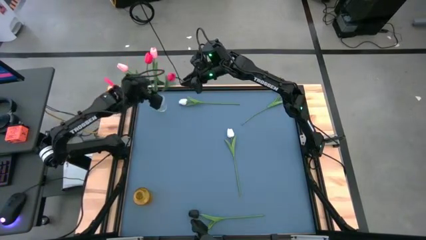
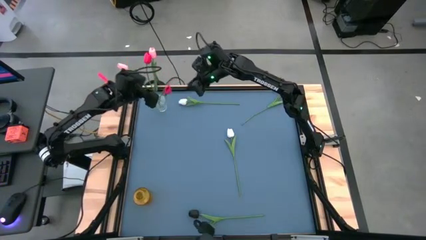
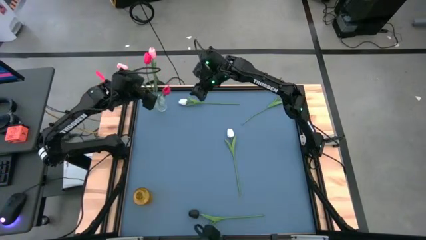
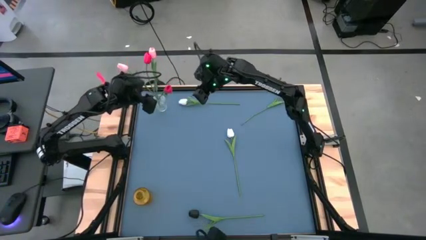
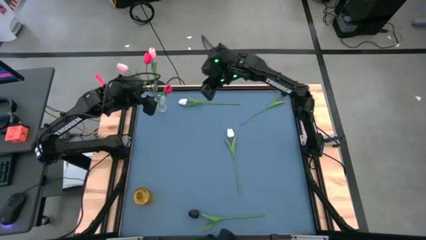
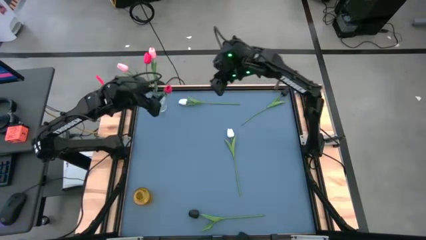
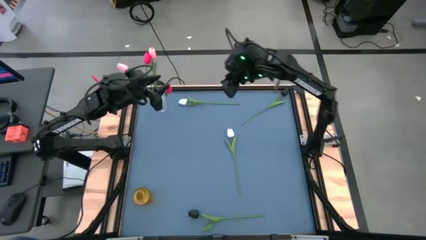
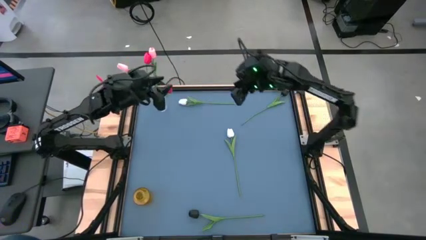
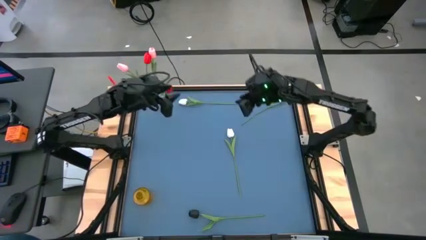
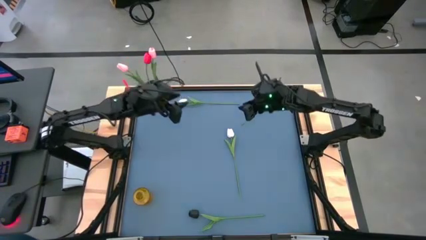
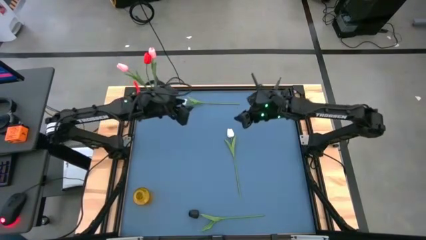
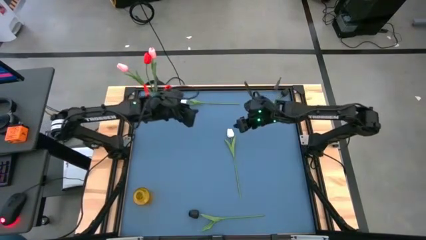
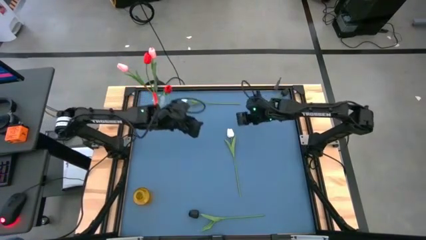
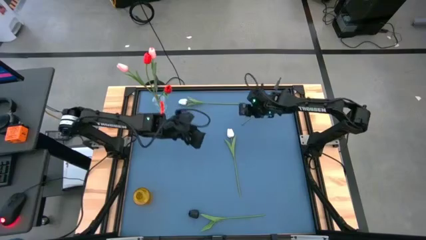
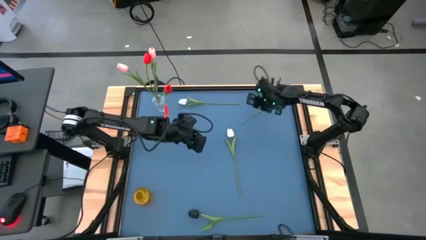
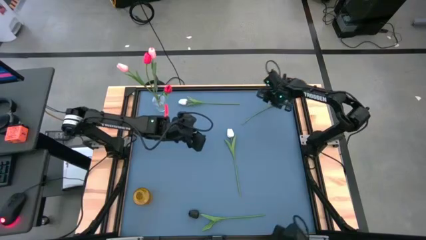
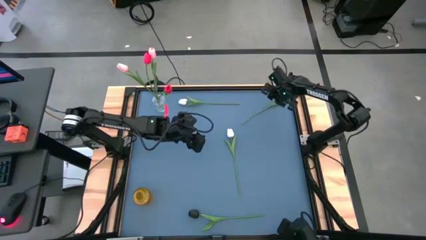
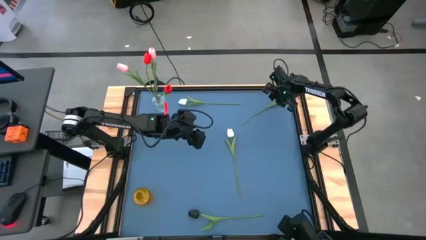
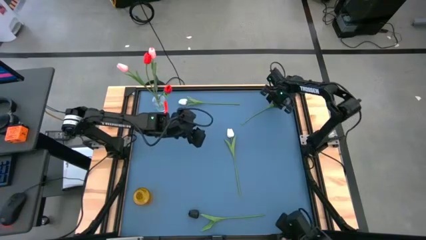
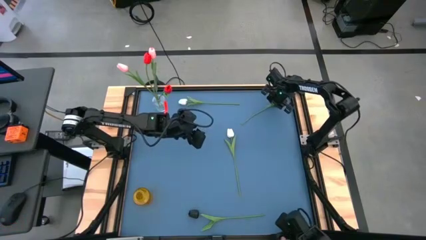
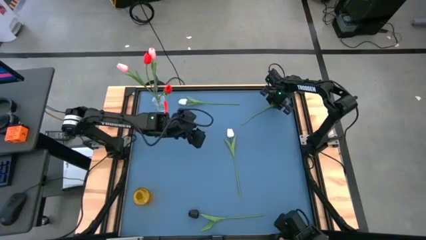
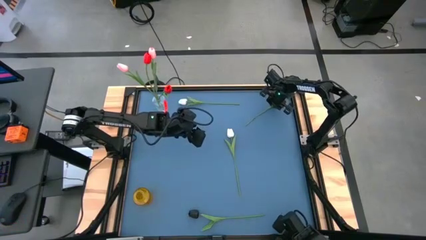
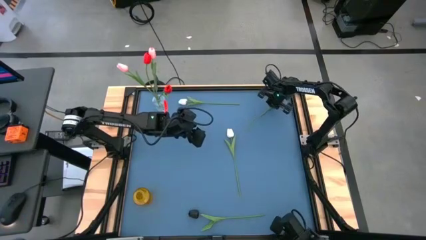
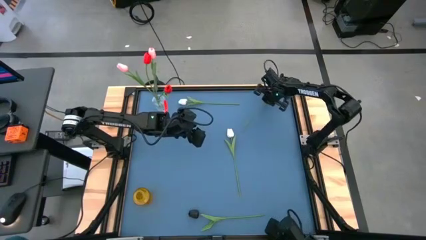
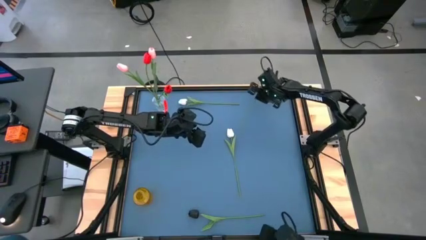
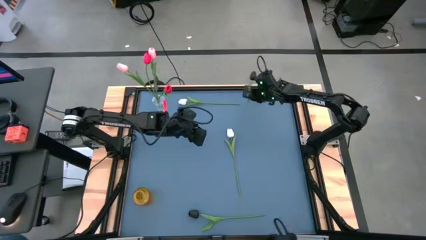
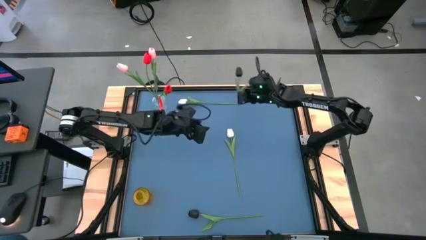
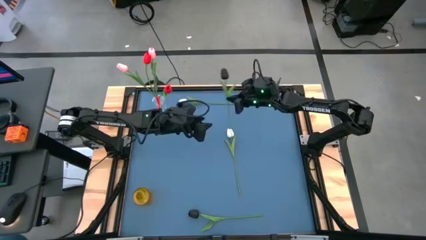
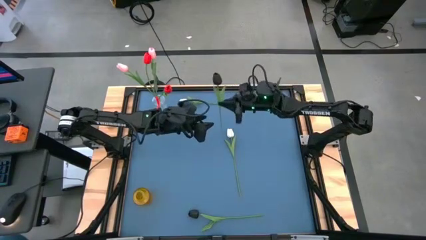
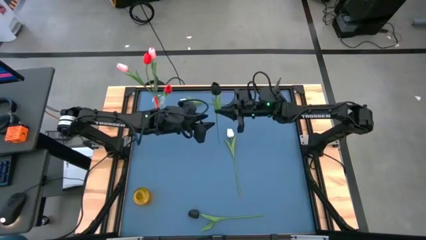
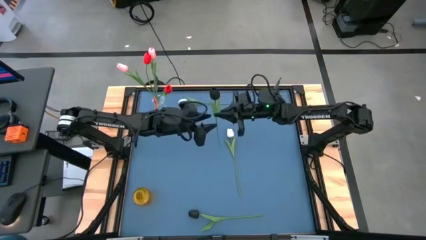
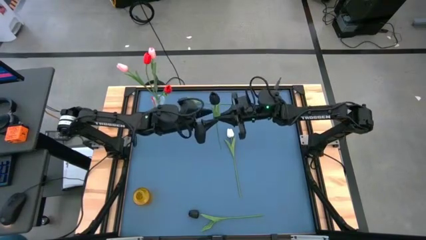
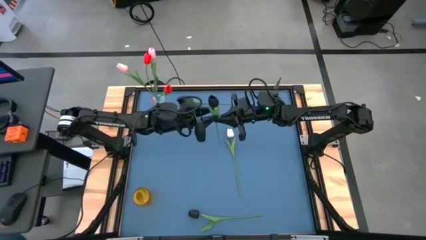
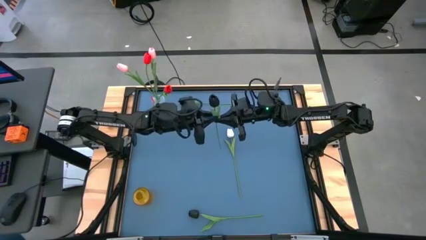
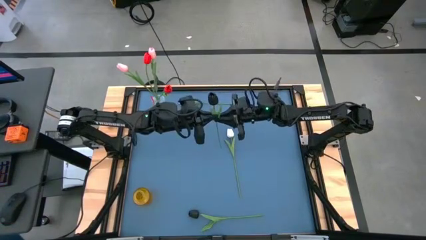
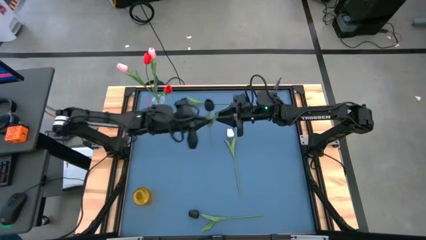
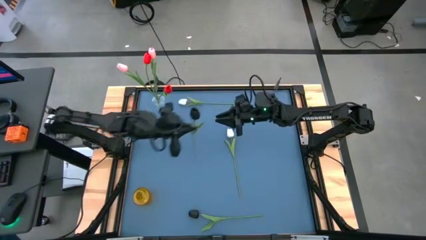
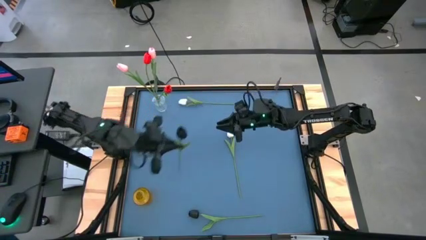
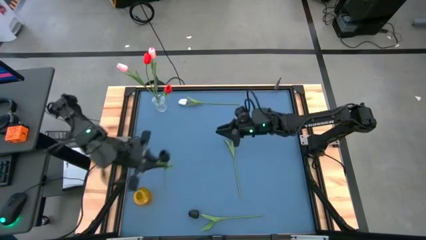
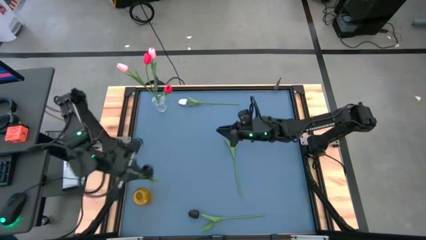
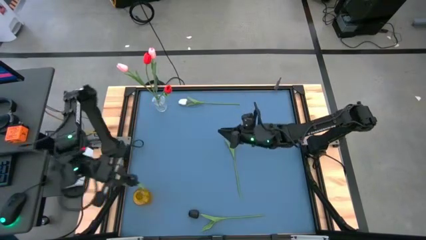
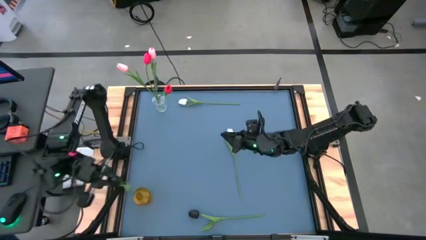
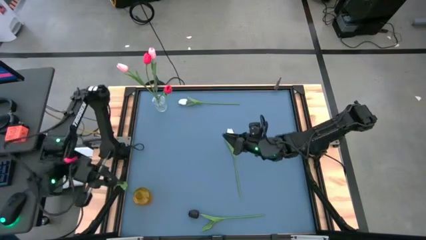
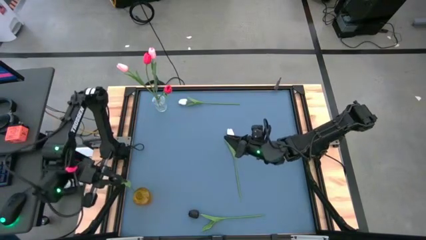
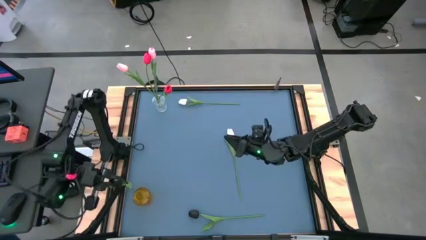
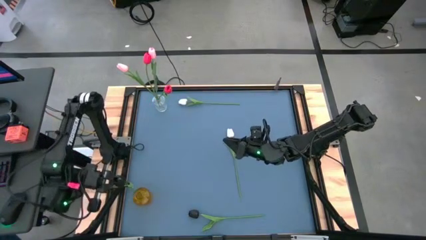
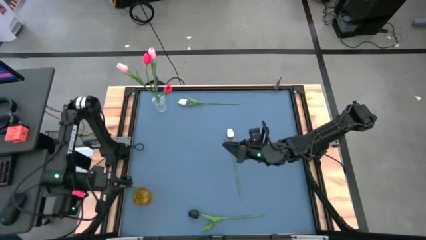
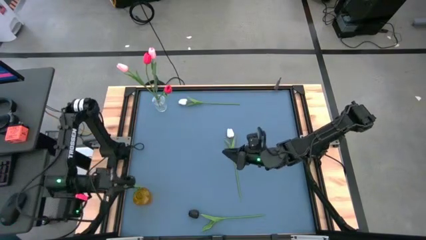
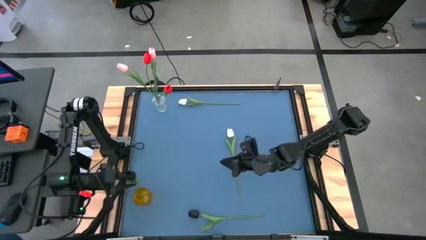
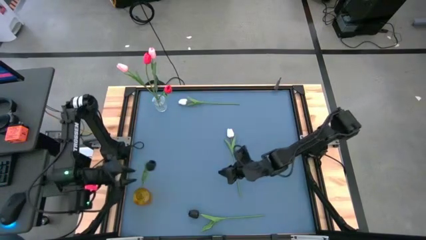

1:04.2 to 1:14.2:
Task: Sort flowers into vase by color
Put the top black tulip into the yellow vase

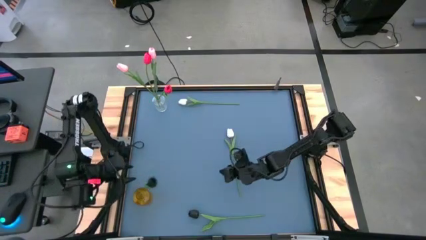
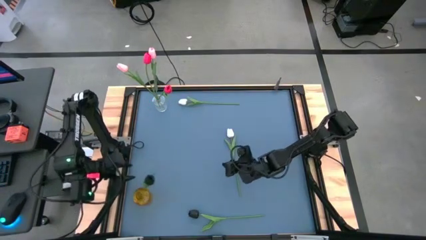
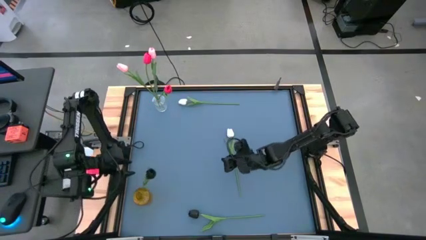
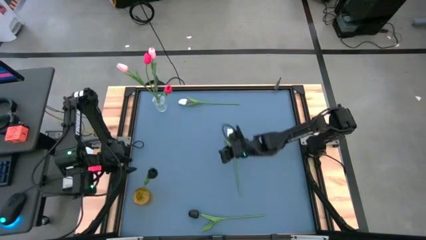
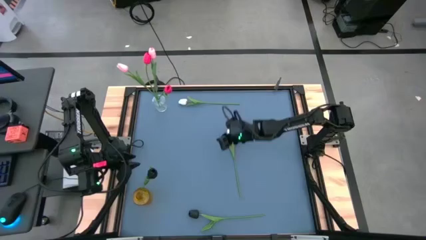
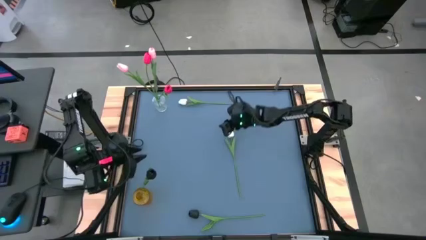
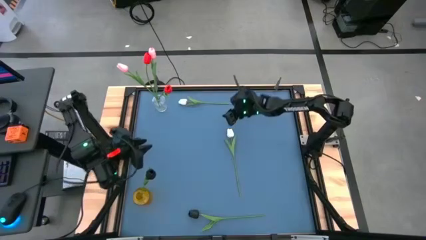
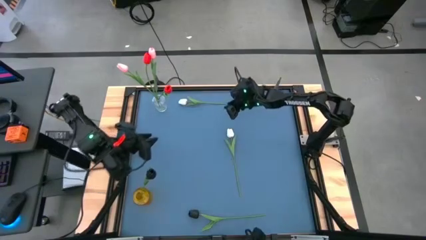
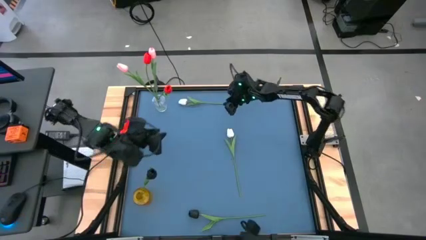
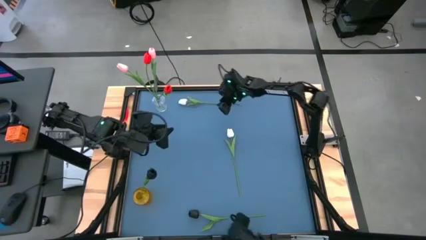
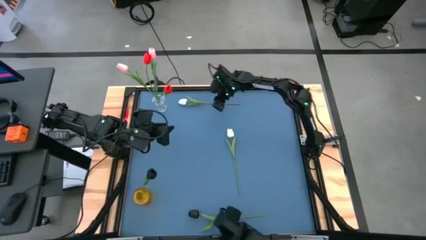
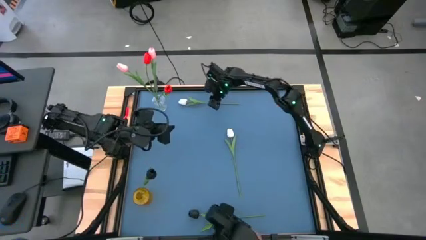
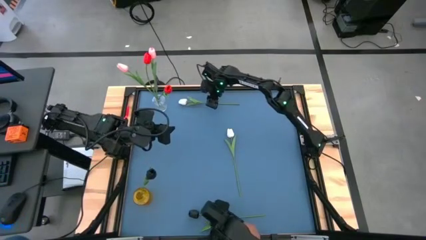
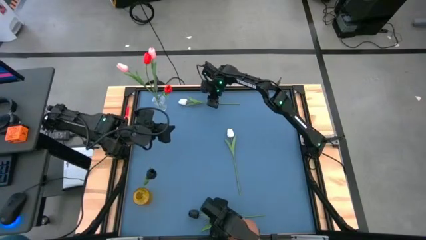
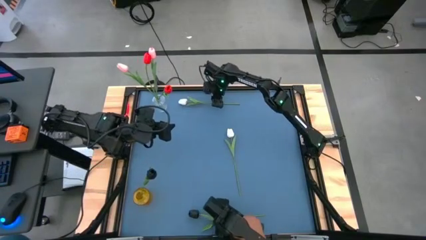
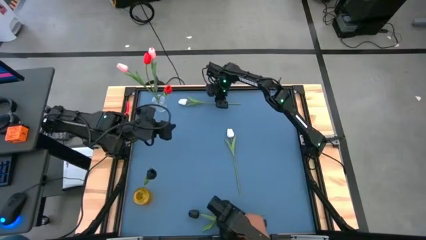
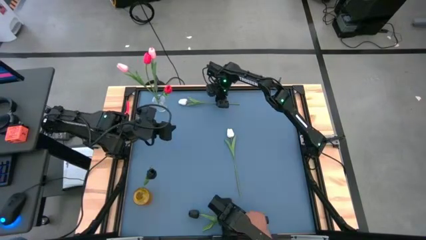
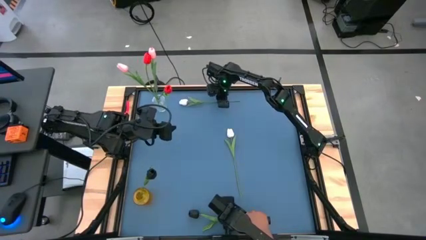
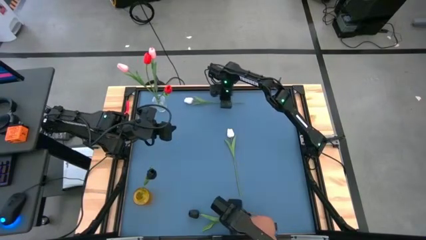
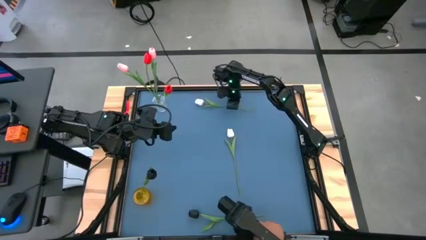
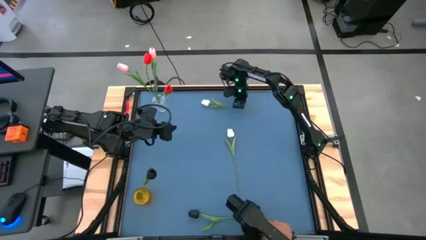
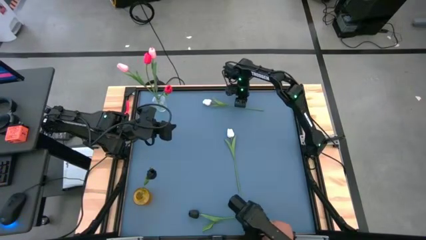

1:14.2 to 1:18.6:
Put the top white tulip into the yellow vase
